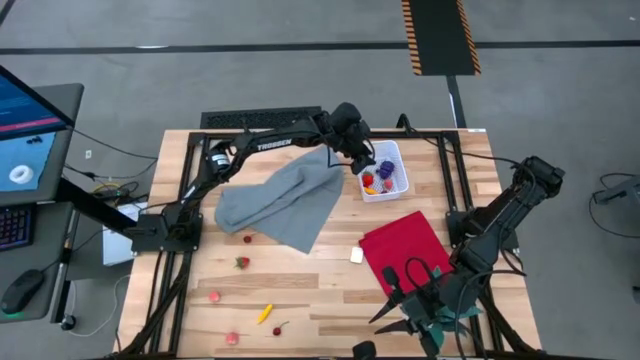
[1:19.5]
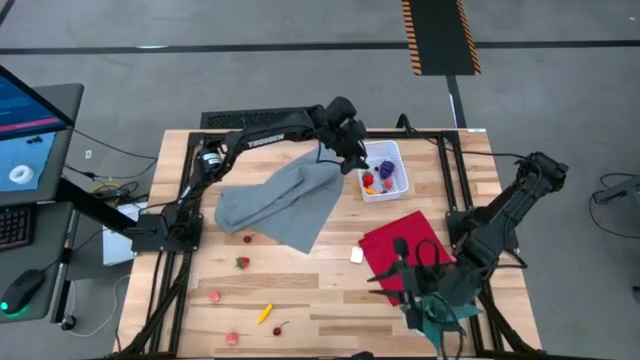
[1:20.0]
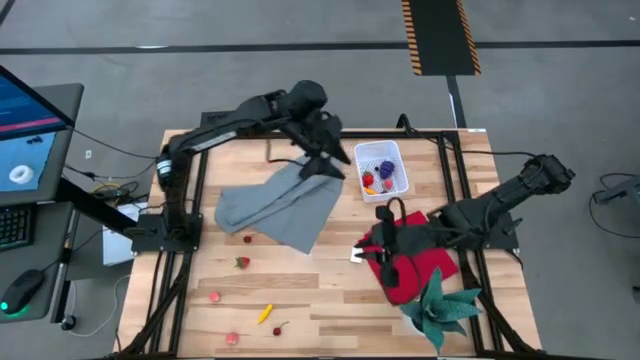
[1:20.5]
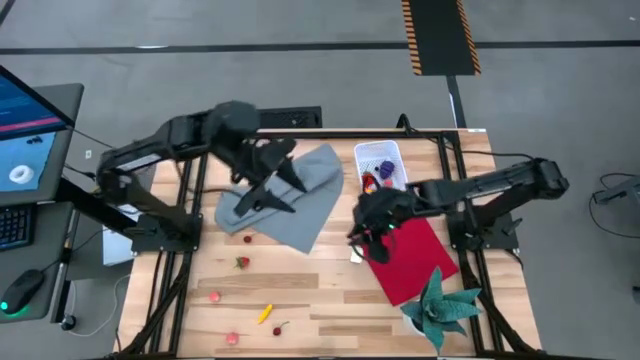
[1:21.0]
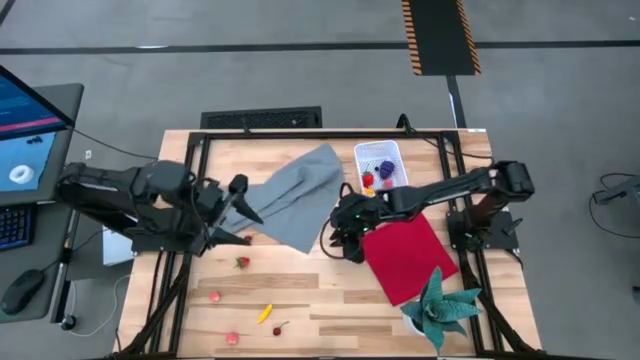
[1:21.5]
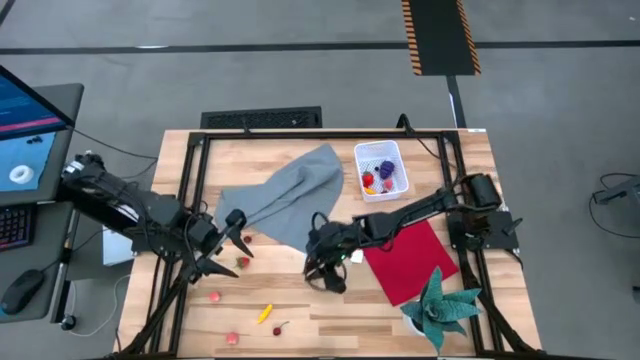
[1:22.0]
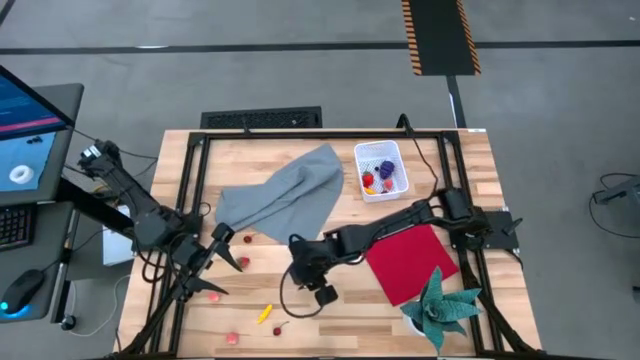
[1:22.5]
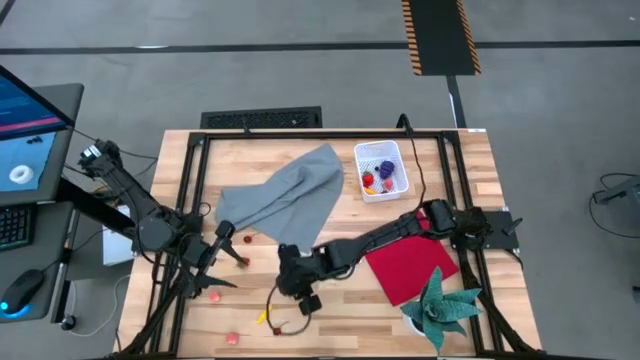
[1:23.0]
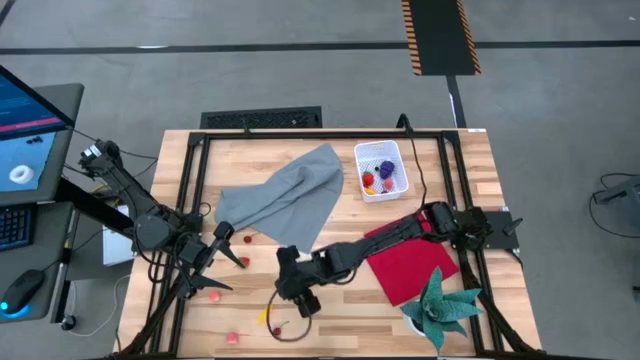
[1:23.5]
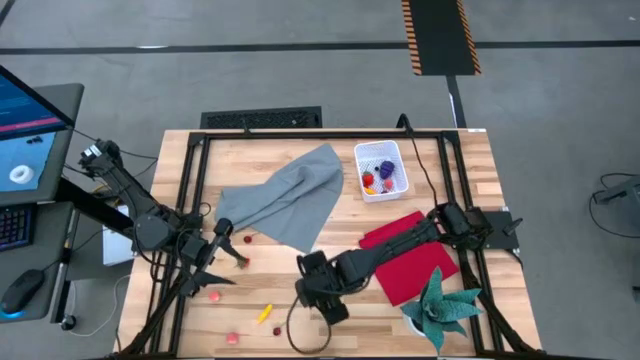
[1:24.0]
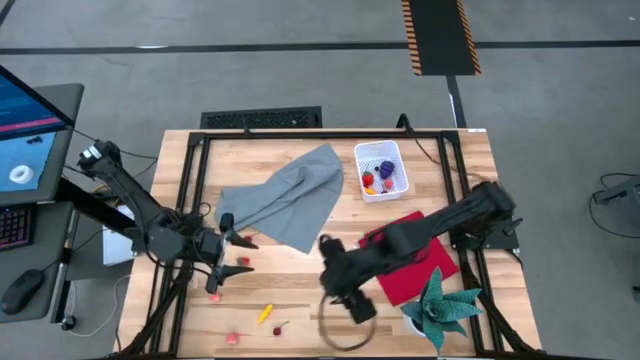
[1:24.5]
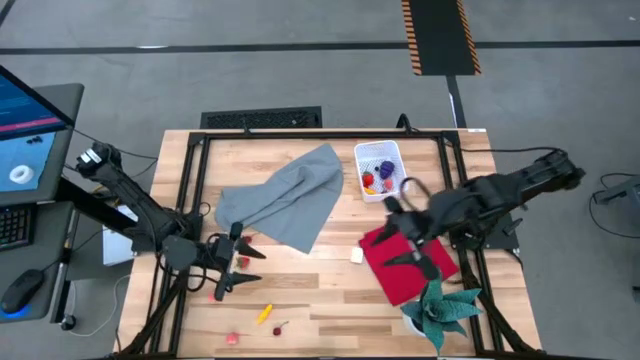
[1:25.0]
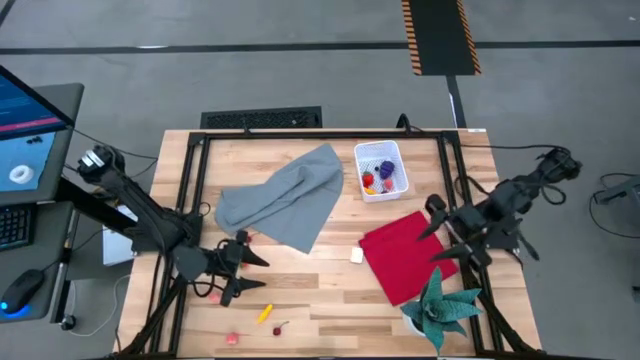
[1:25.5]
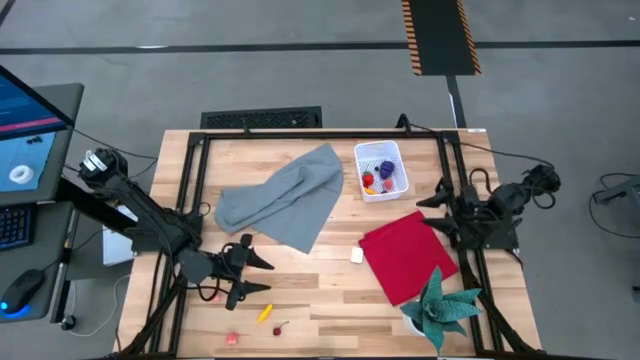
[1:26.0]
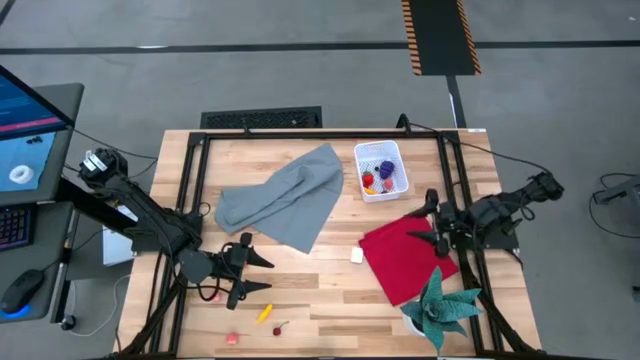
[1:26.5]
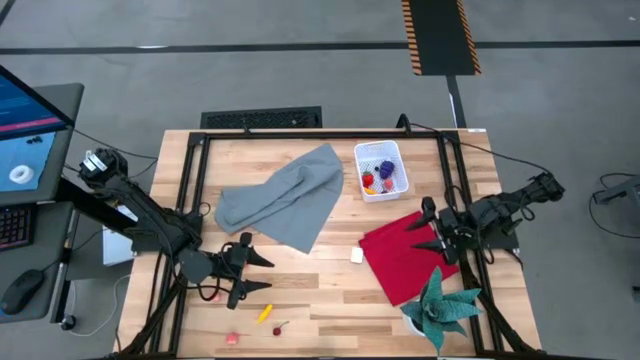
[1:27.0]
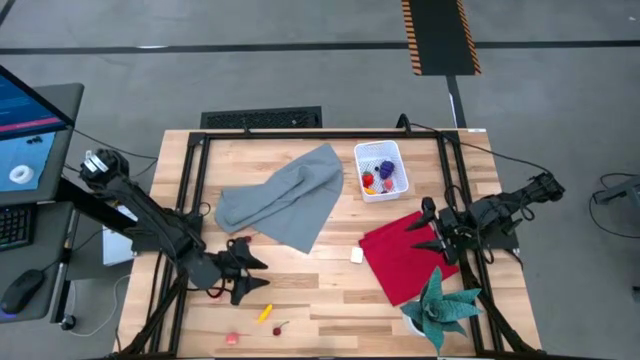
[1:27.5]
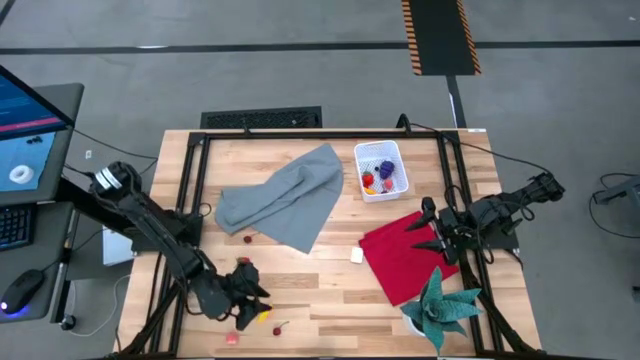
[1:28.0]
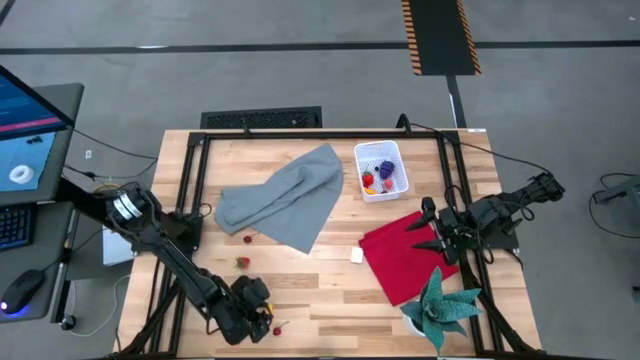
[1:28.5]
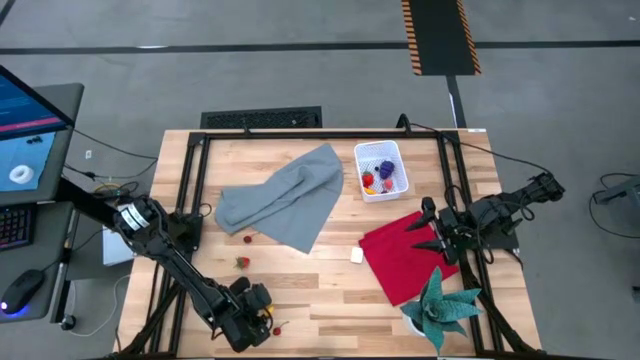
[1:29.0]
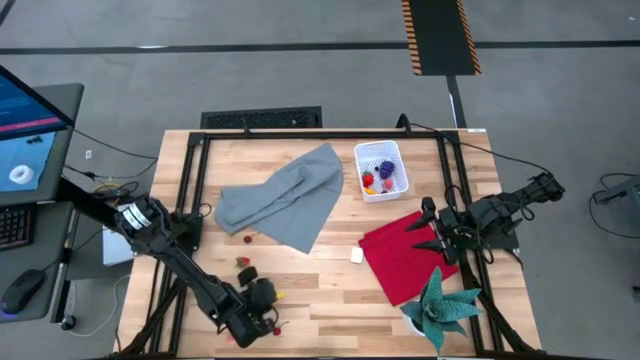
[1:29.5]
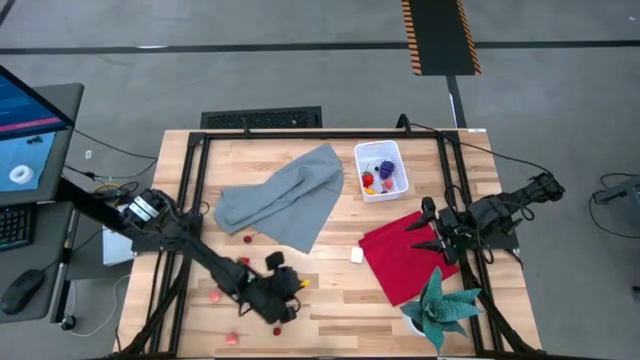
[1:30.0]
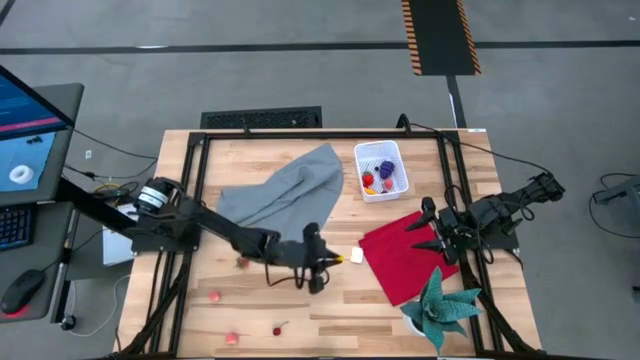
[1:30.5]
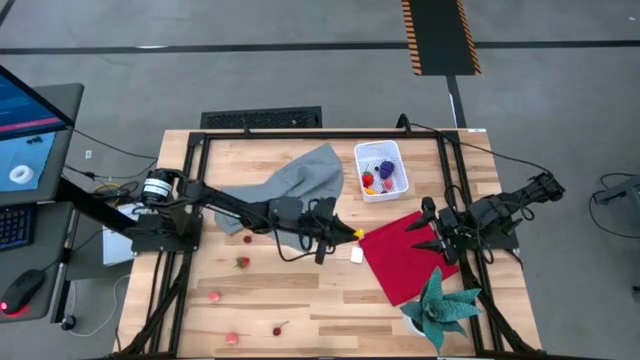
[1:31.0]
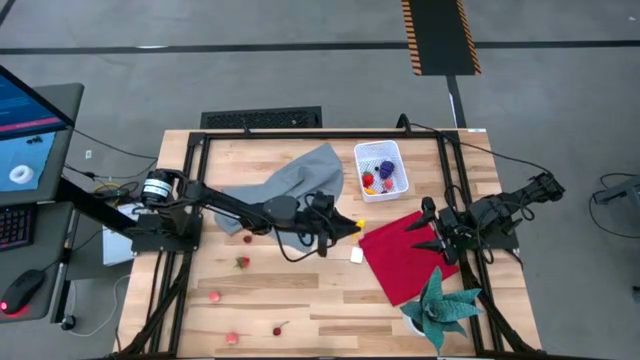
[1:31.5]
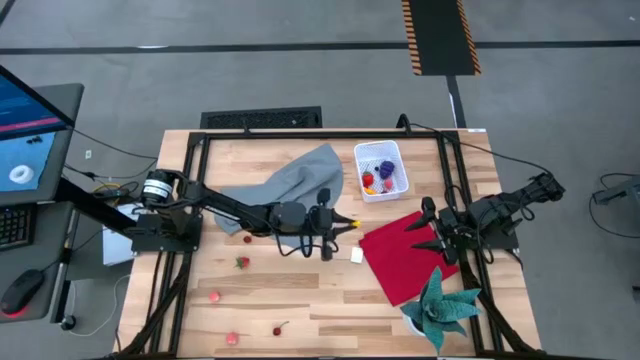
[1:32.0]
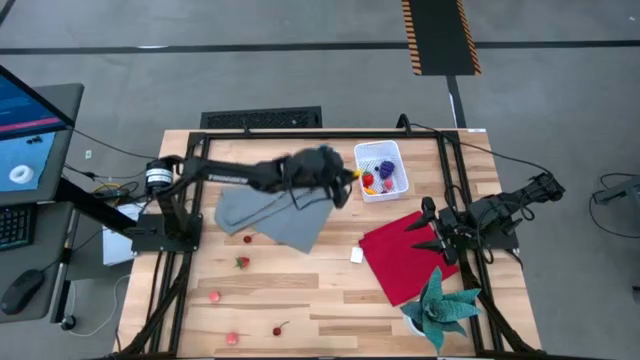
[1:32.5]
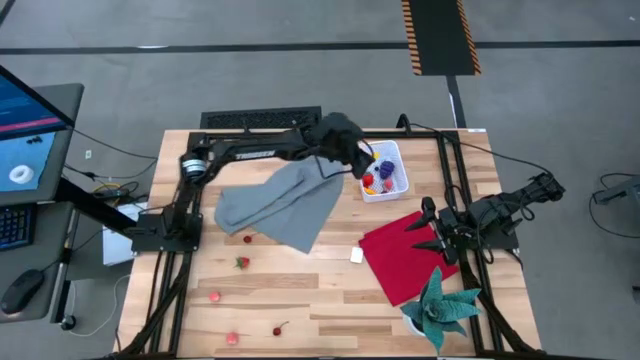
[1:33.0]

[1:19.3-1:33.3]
Task: Pick and placing Produce into tupperware
Put the yellow corn into the white bin

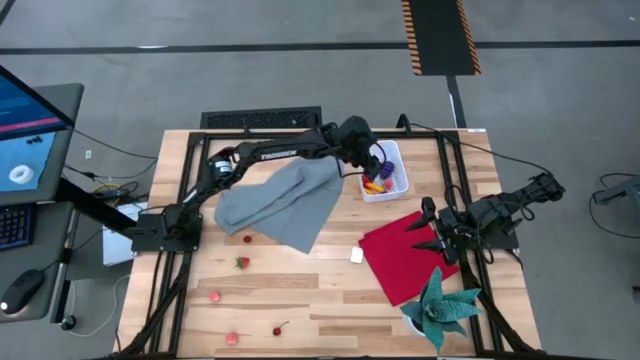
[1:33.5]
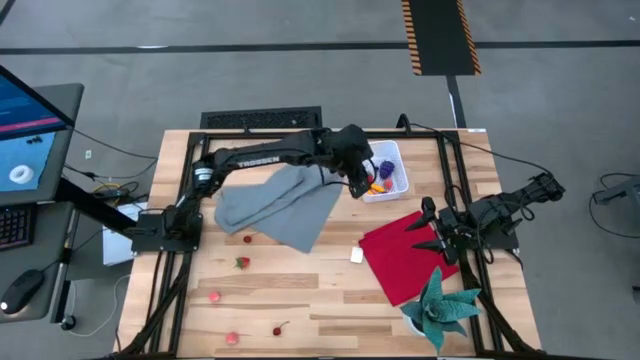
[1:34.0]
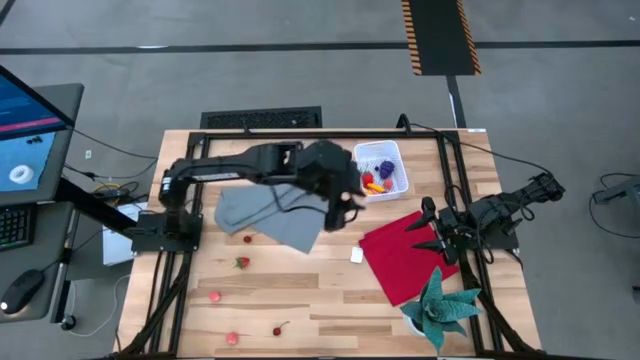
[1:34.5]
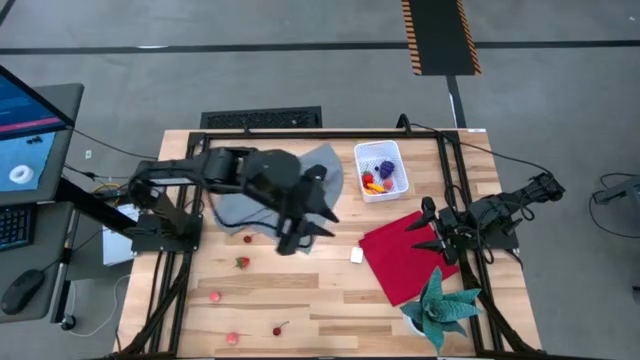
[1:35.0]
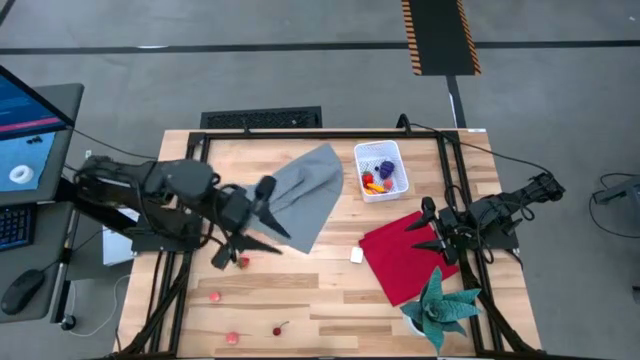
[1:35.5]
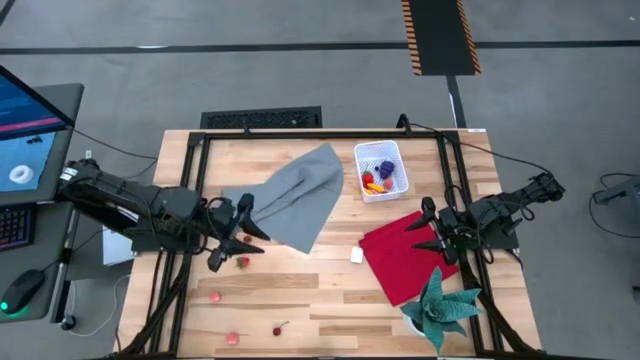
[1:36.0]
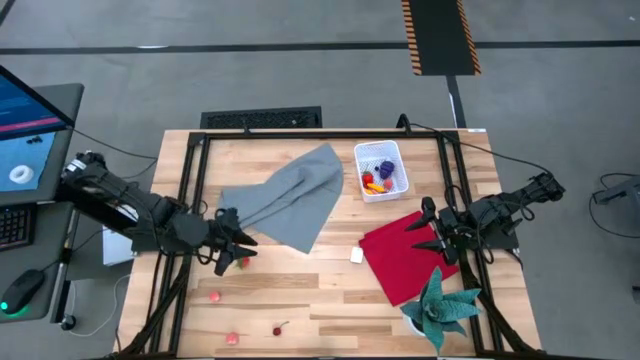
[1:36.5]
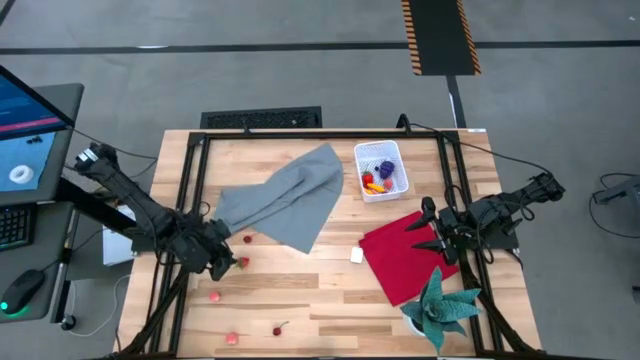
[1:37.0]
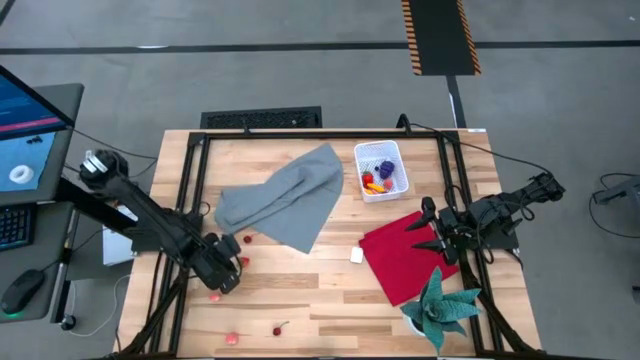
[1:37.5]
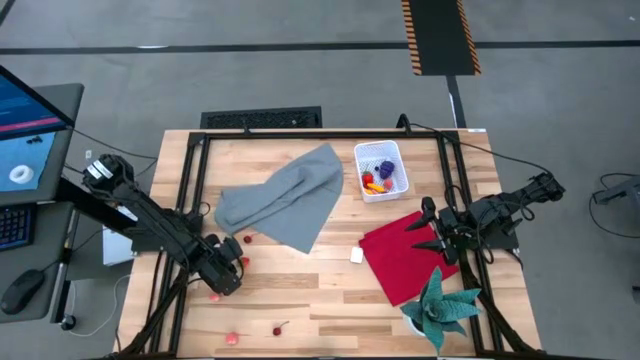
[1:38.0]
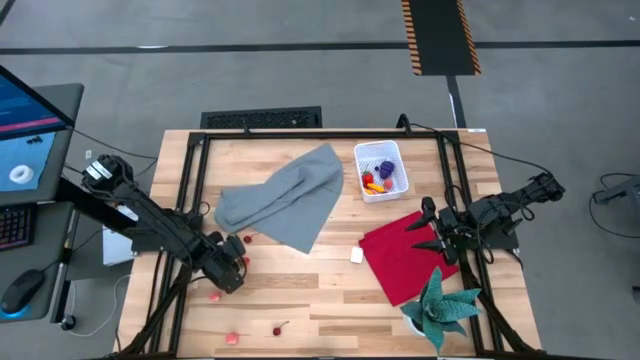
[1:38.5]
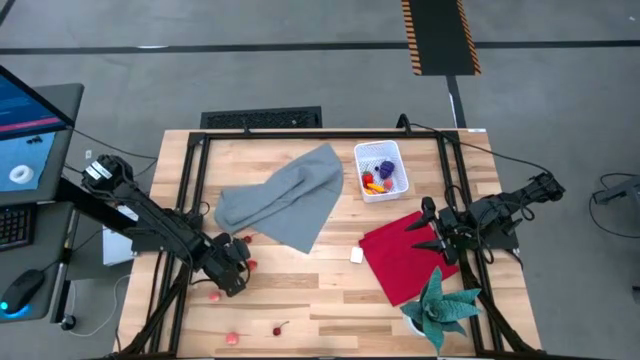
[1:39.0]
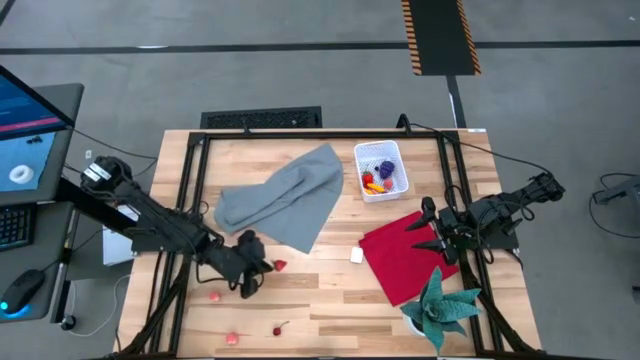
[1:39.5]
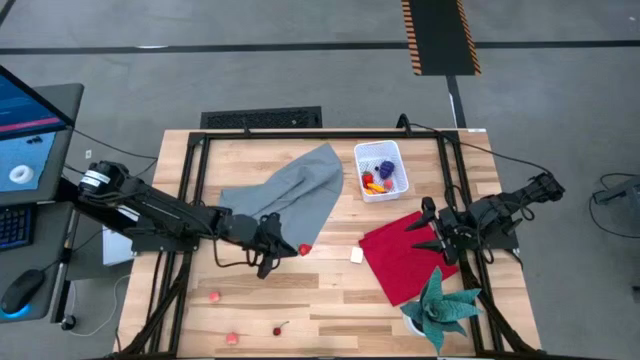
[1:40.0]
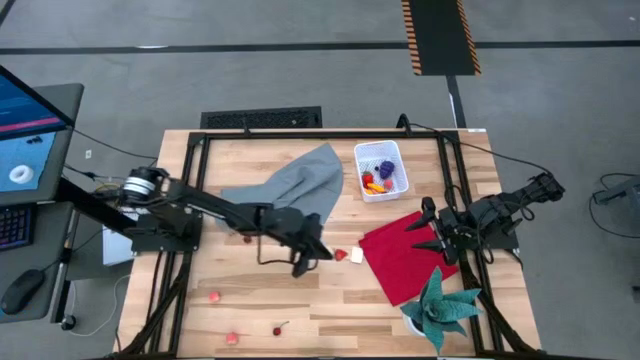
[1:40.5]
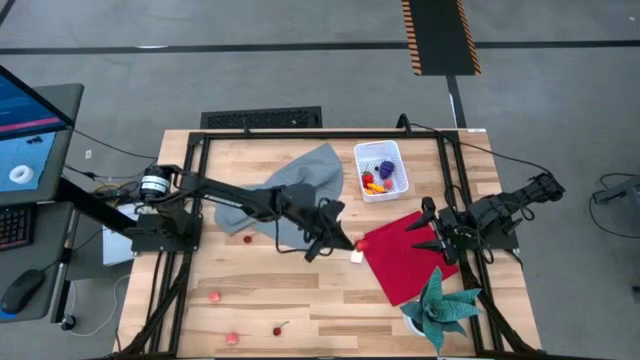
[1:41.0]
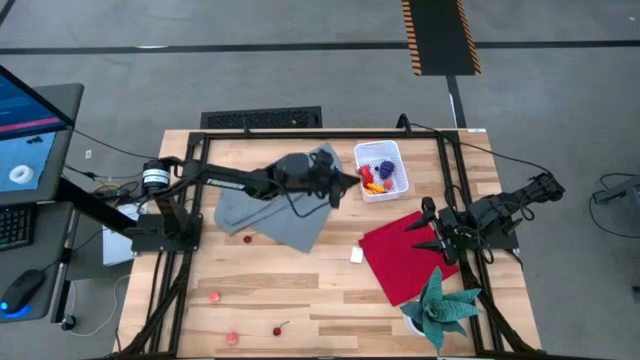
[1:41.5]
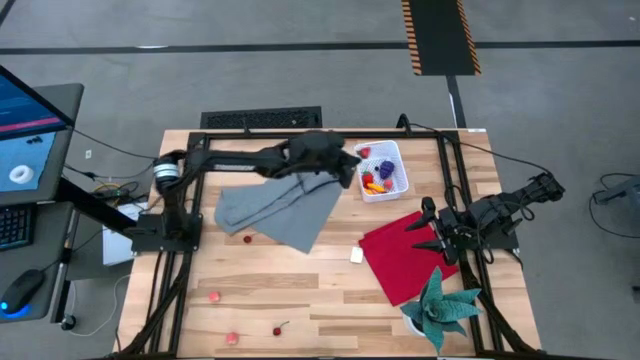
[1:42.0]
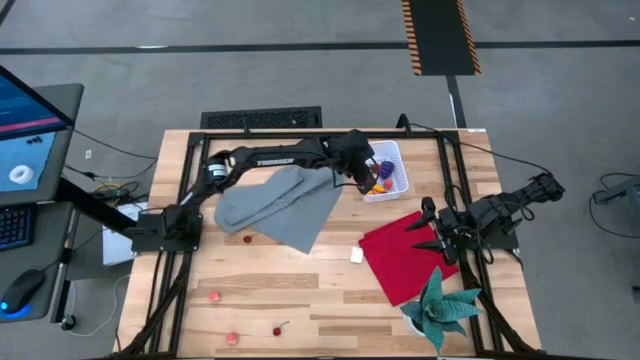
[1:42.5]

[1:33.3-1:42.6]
Put the red strawberry into the white bin
